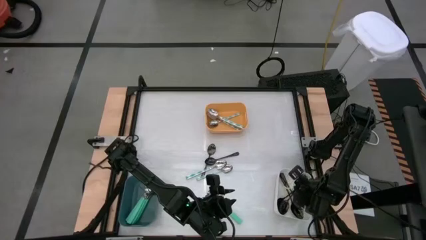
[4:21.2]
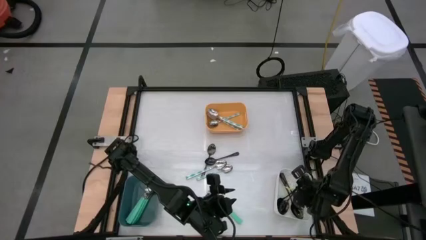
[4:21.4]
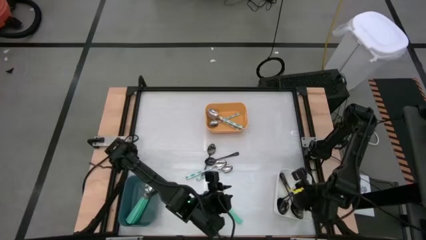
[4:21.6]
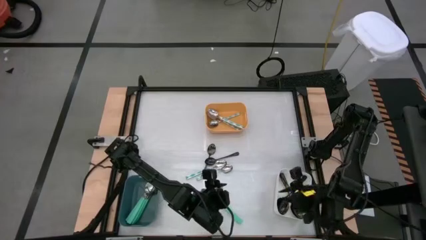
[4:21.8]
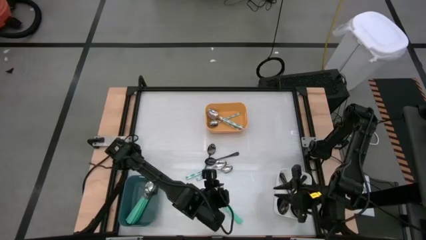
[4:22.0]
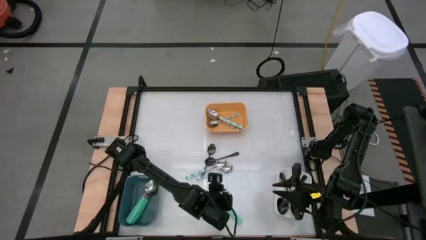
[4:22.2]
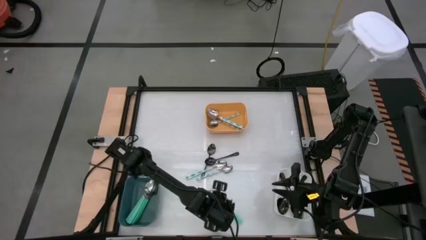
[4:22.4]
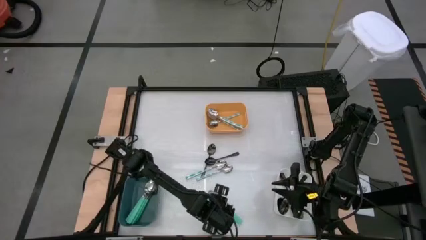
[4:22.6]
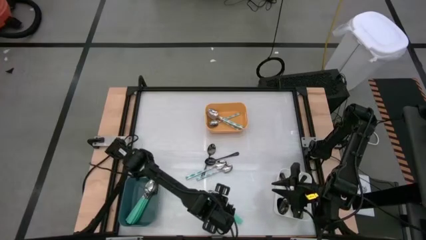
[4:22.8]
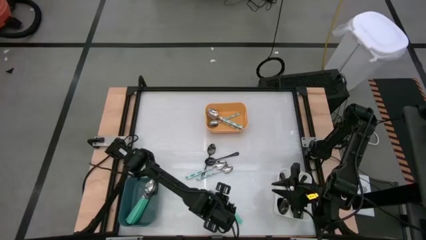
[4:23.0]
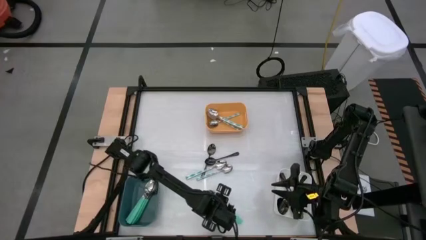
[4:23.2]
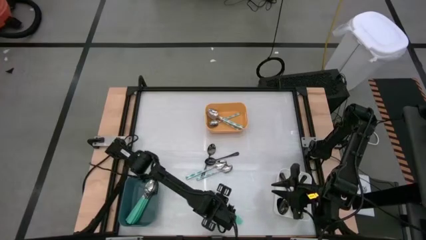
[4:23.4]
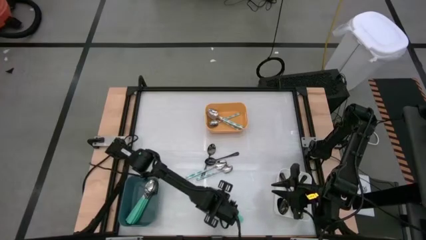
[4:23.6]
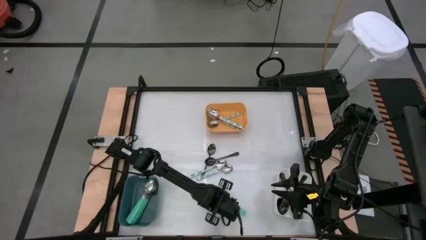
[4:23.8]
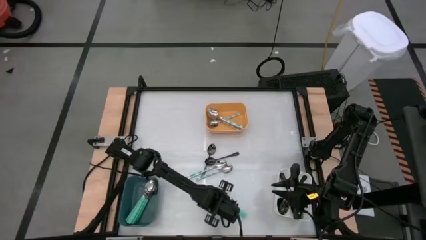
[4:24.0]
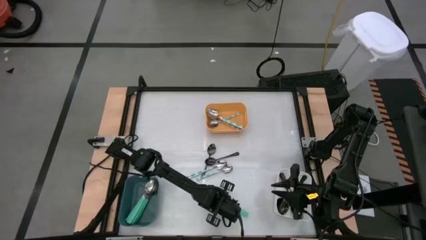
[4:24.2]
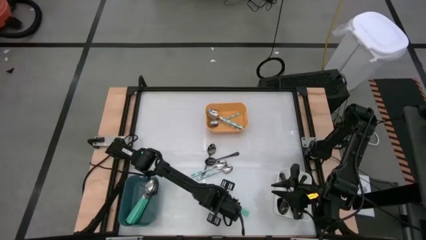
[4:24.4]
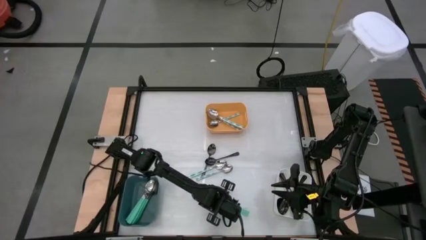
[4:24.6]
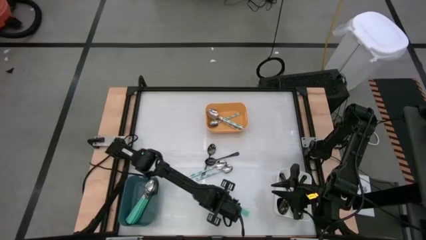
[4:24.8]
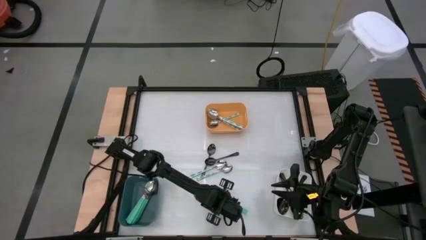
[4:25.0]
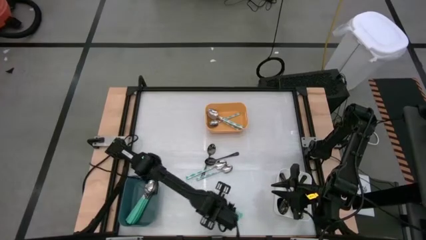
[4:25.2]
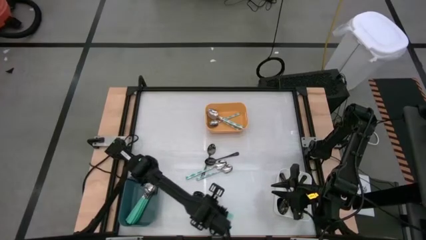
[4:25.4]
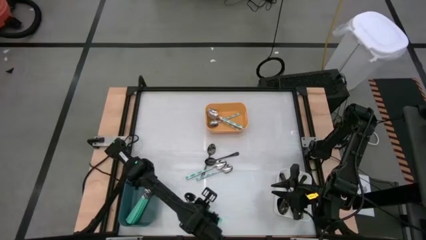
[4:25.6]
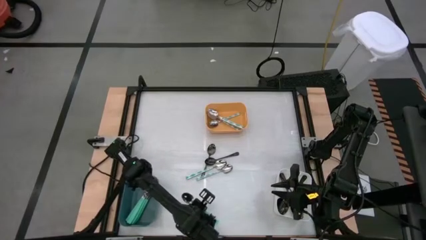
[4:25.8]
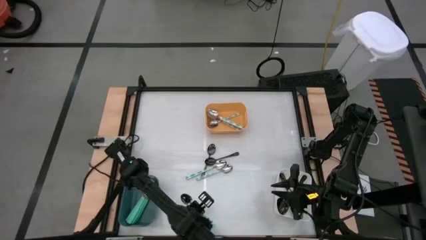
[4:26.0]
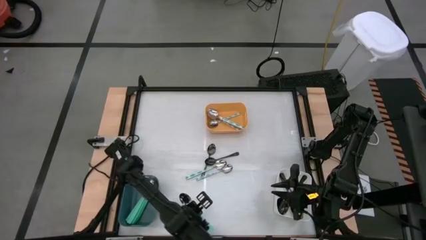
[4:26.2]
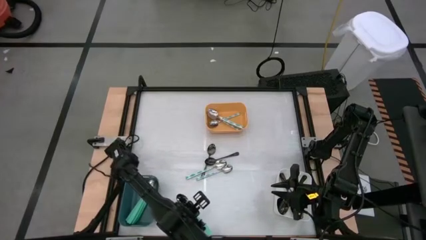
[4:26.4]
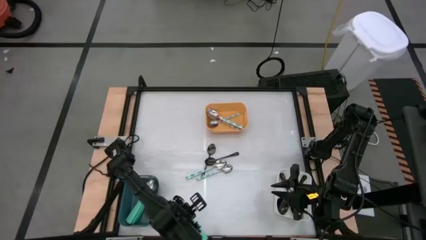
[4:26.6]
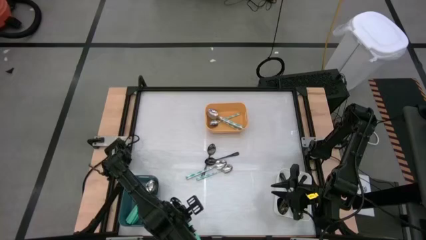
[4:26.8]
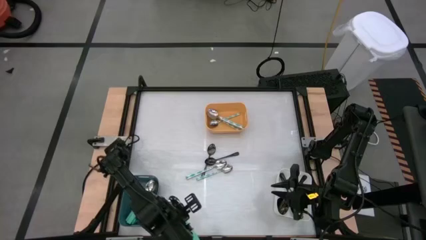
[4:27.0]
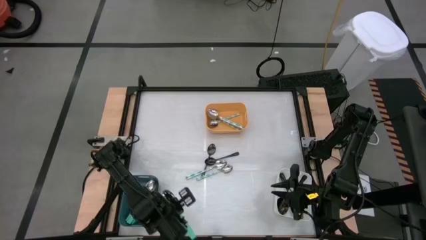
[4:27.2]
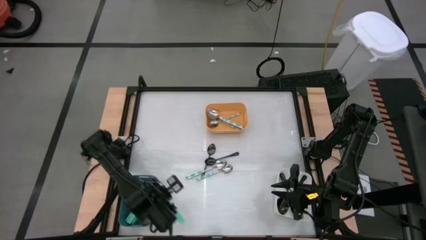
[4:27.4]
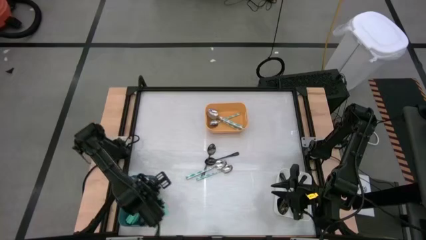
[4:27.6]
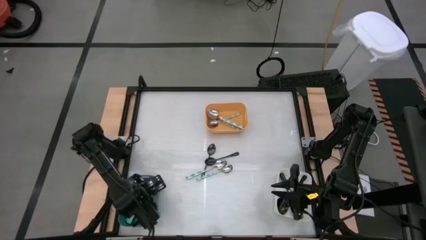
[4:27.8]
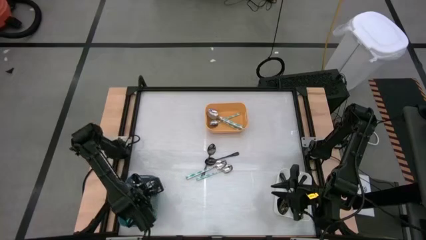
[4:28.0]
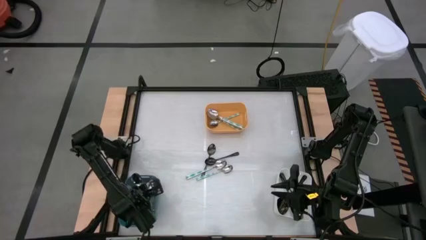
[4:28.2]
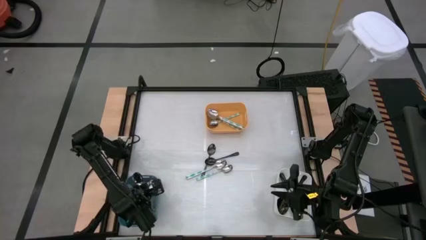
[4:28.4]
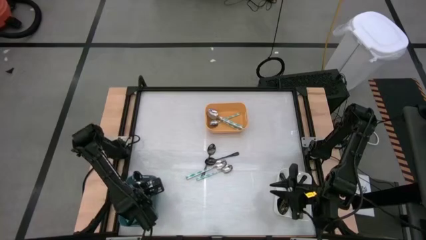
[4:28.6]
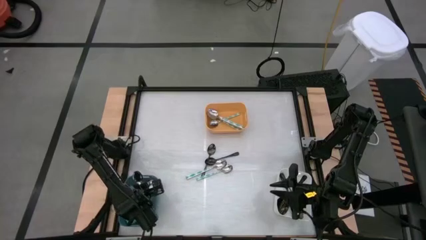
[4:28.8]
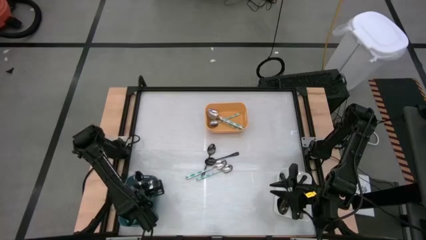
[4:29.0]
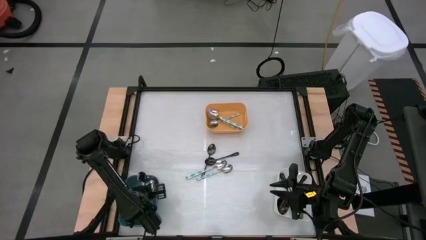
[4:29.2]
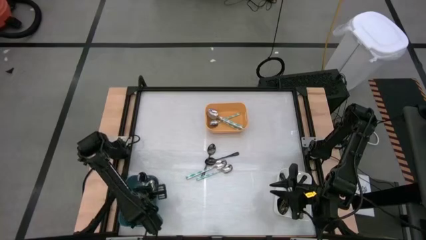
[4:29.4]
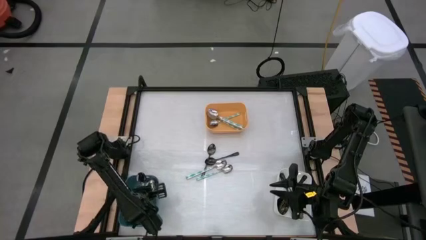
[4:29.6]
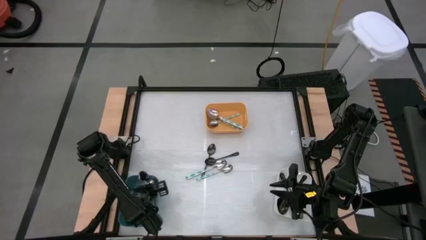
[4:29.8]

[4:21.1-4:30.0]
Task: Sort silverware by color (type)
Put the green spoon into the blue bin

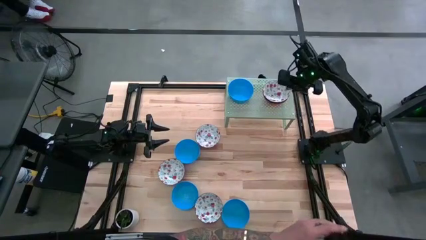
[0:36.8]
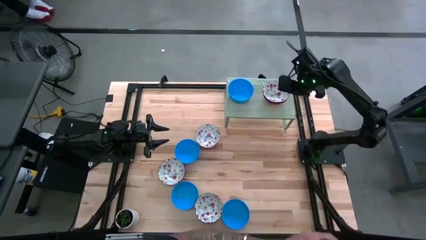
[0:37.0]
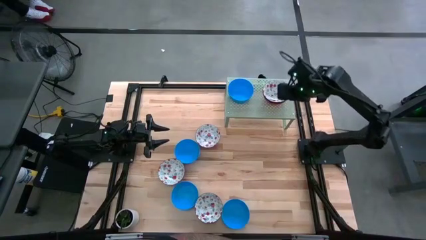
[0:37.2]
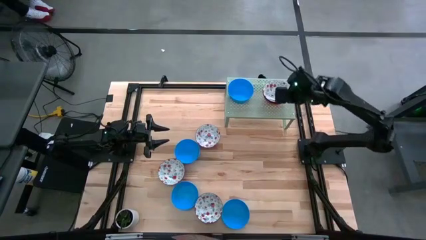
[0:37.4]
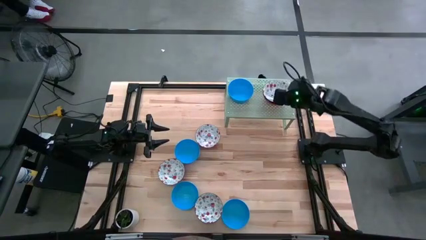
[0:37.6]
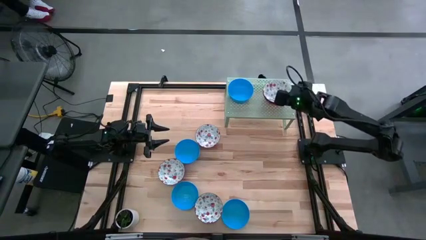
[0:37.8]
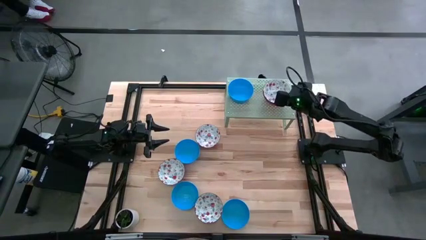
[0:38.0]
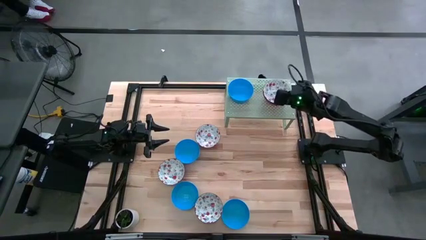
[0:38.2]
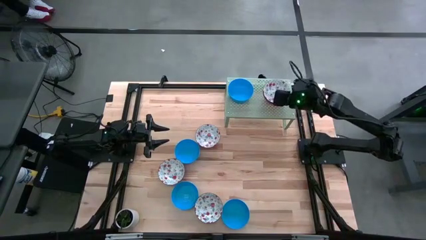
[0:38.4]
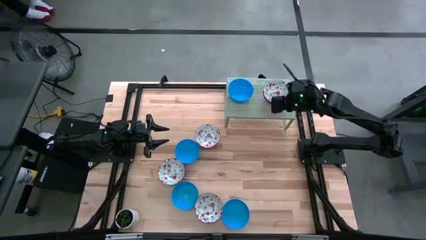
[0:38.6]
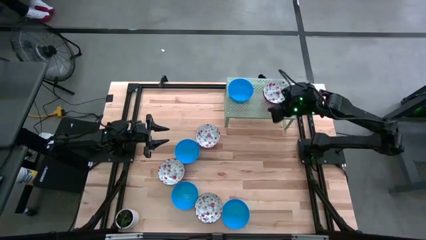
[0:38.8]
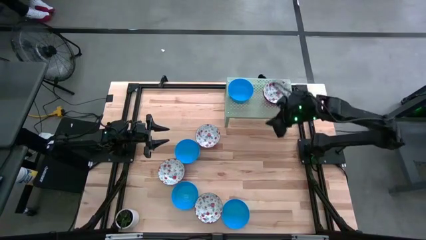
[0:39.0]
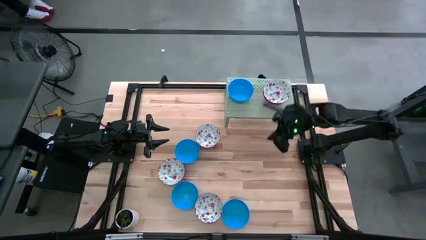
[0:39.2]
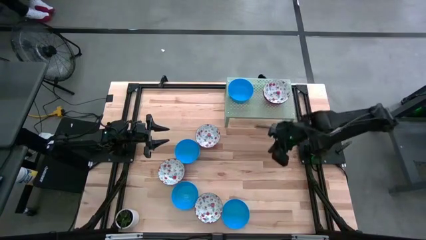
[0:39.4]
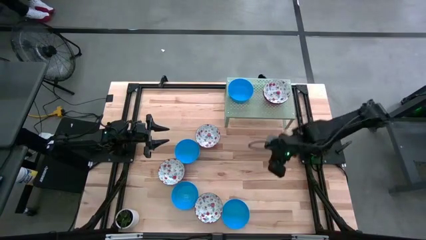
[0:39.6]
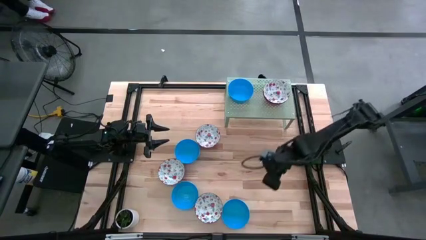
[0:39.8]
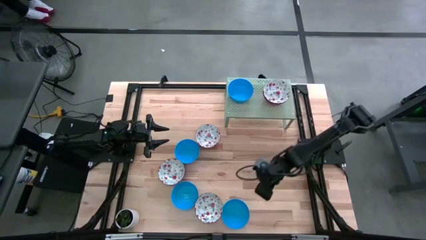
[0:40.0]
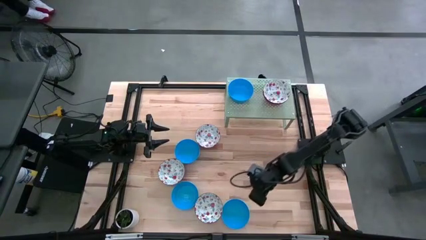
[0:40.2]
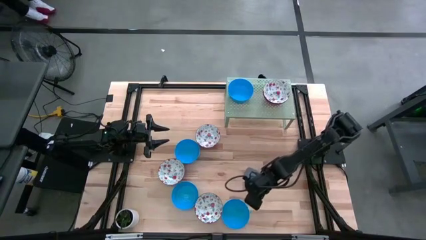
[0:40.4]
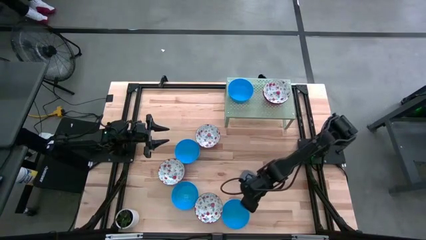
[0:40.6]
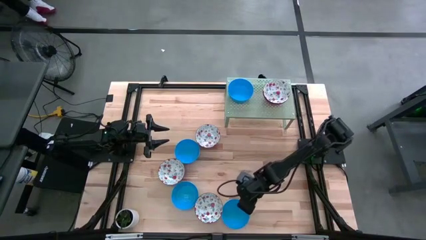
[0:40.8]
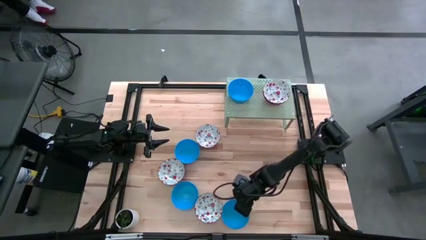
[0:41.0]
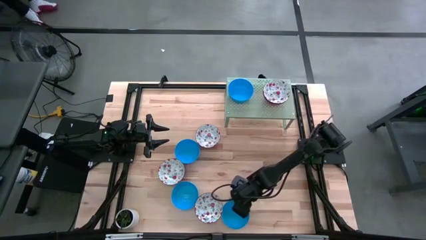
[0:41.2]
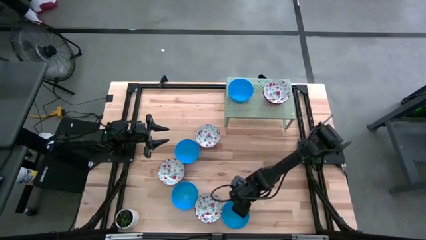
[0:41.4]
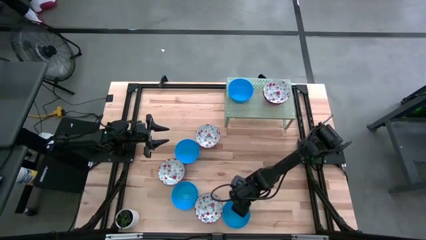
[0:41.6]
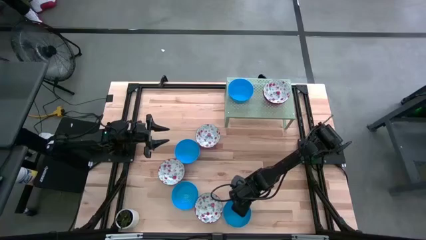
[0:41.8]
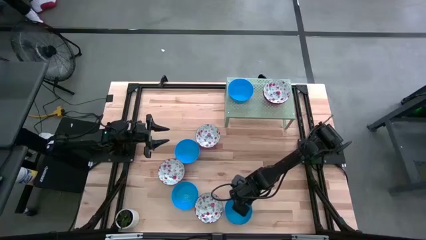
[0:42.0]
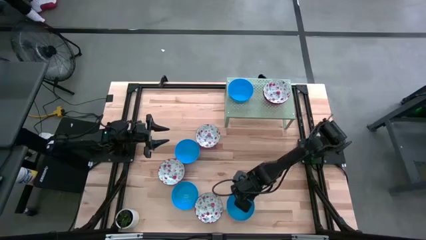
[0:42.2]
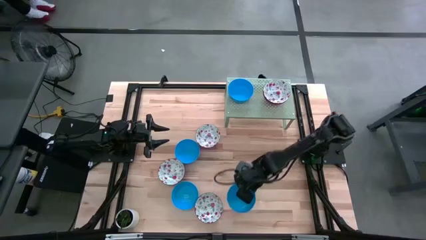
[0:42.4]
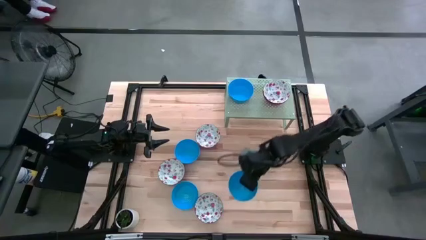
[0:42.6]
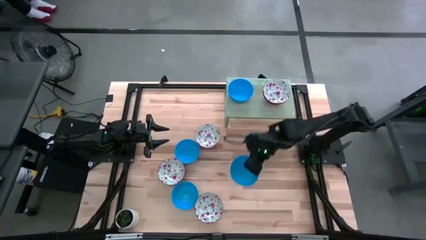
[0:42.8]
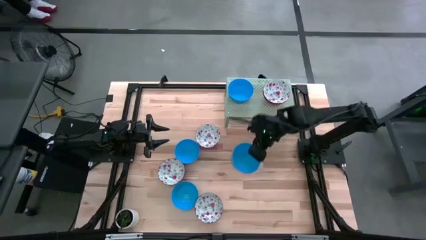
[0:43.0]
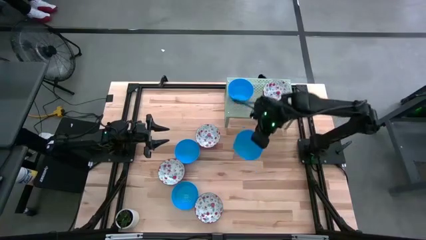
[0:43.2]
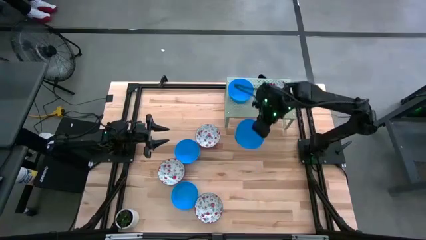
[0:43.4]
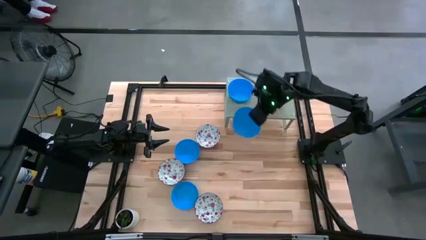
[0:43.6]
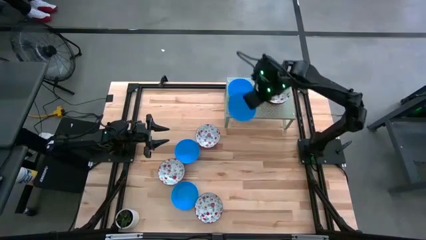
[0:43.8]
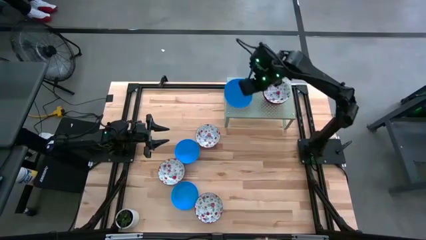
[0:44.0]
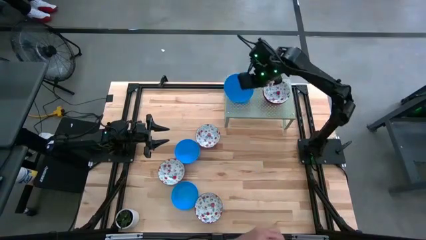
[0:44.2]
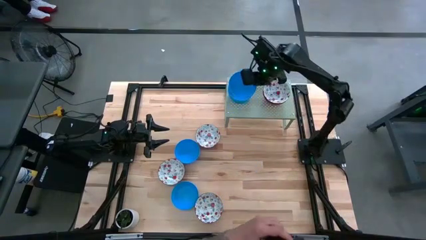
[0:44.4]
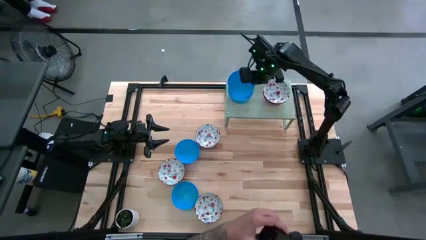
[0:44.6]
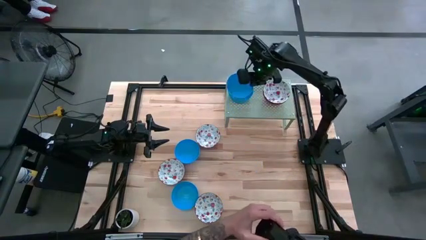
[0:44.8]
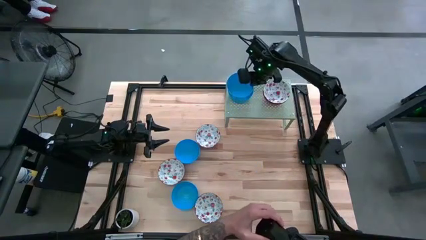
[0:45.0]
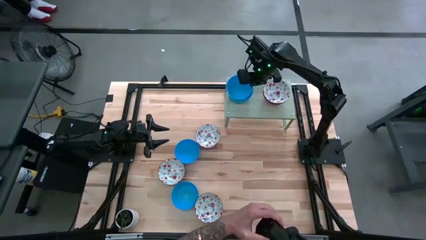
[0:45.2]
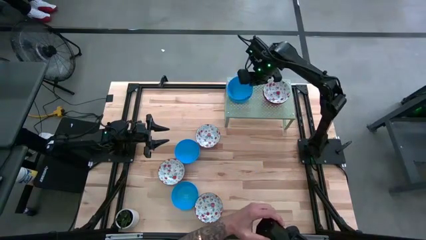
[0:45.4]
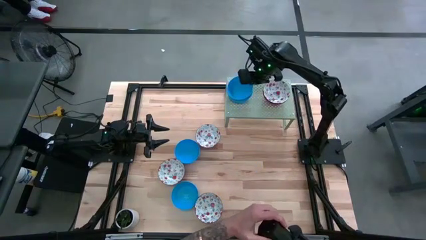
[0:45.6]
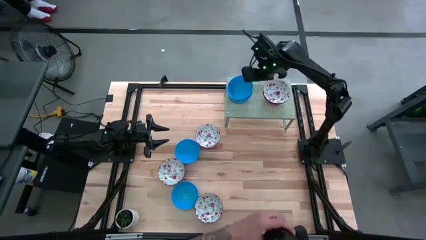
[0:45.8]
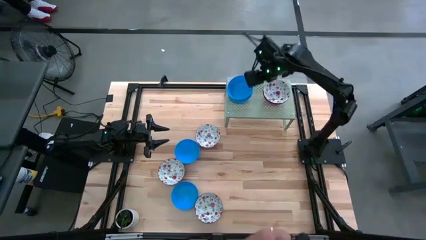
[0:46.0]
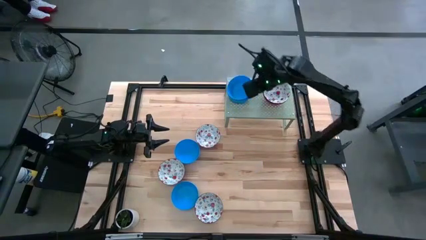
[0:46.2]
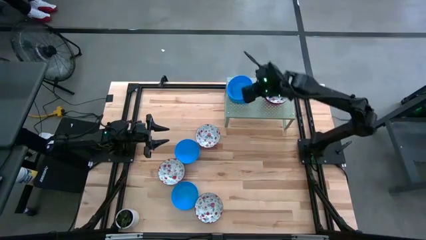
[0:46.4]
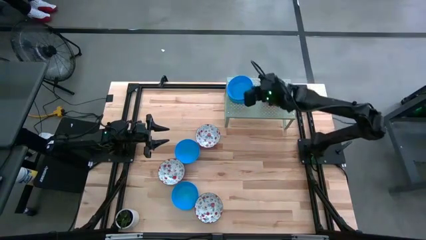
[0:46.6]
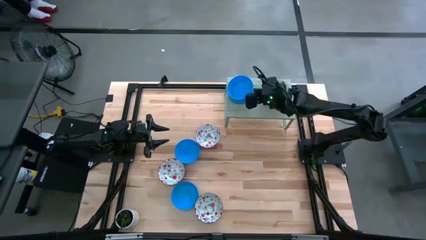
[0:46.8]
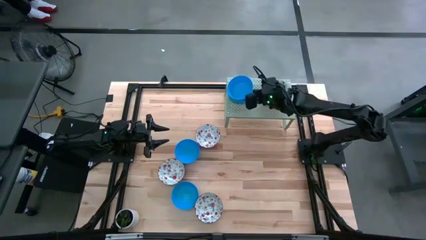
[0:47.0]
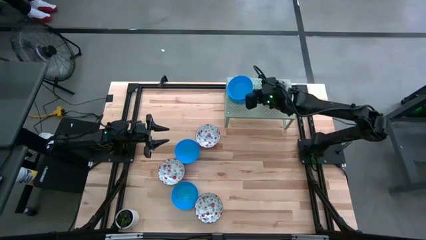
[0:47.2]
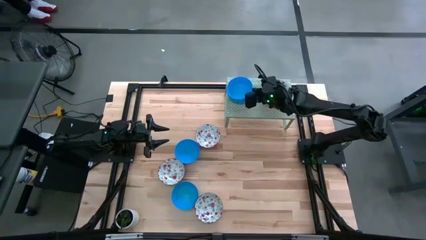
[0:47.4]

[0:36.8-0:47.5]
Task: Pick & Place Mini bowls
Stack the blue bowl on the blue bowls on the shelf
